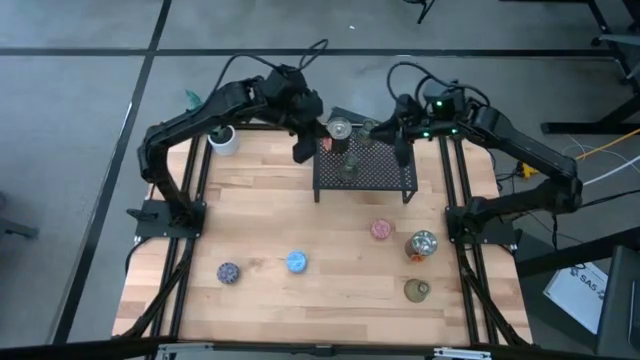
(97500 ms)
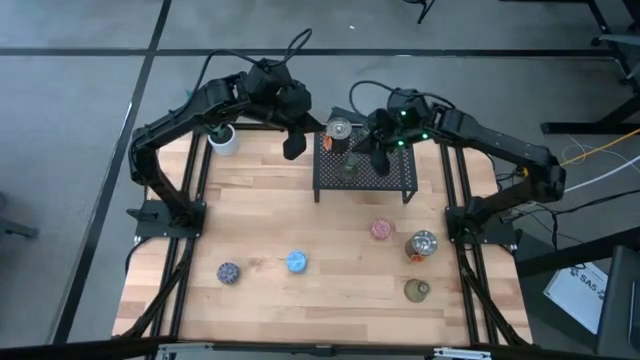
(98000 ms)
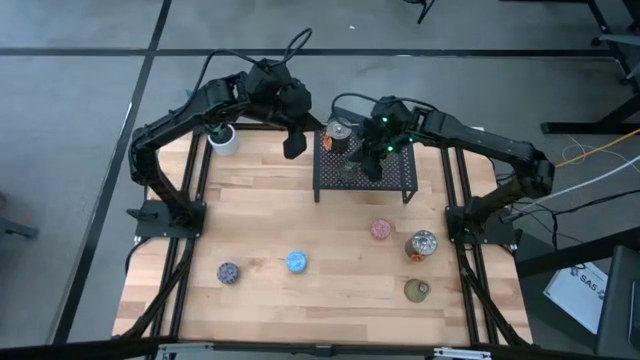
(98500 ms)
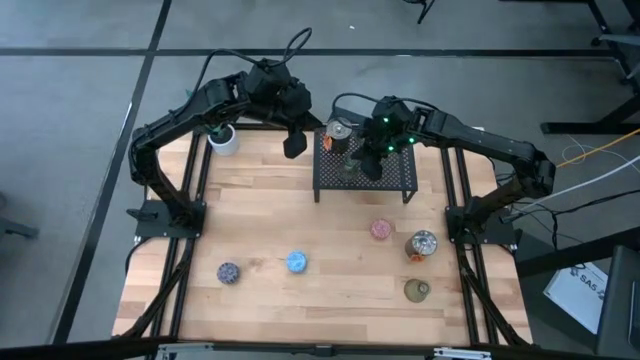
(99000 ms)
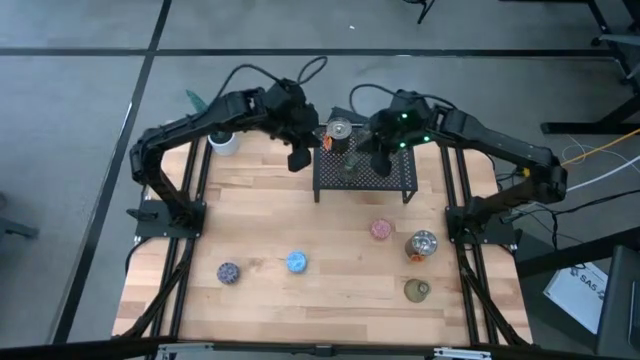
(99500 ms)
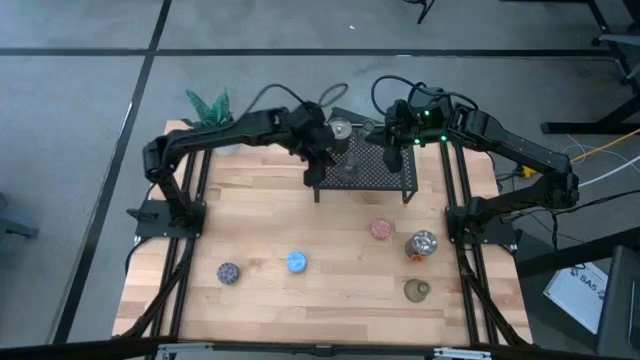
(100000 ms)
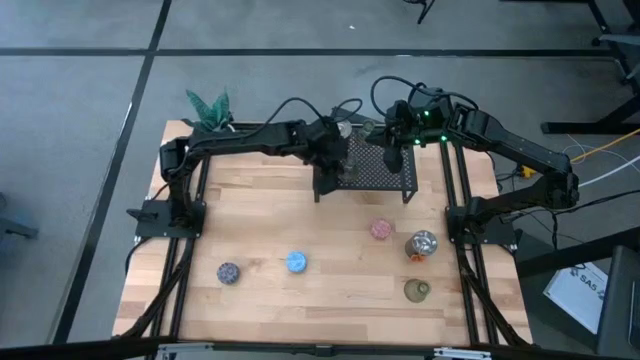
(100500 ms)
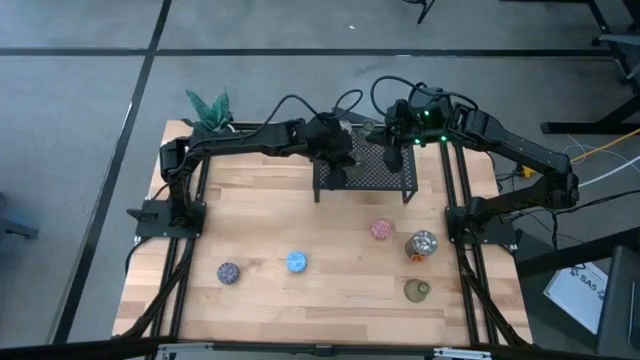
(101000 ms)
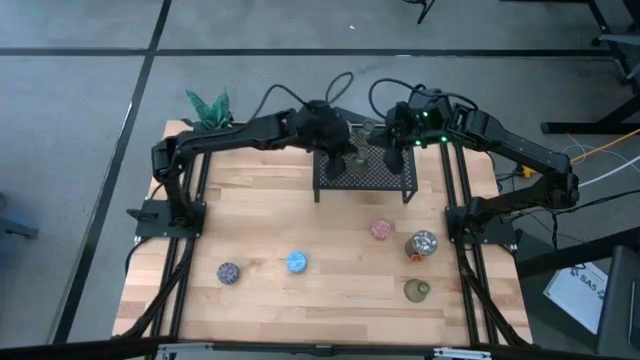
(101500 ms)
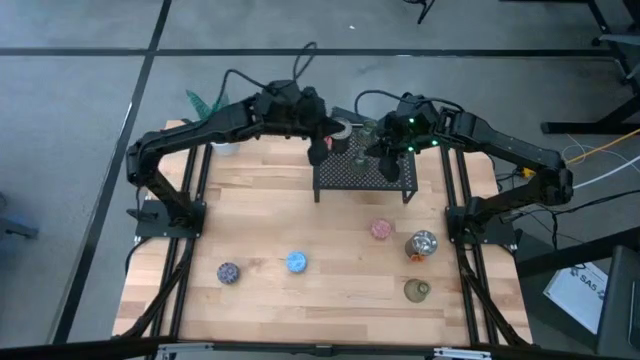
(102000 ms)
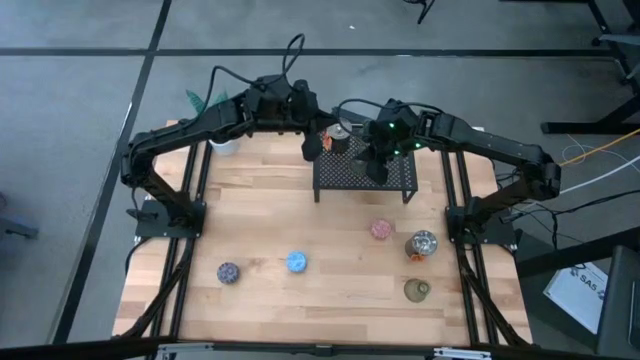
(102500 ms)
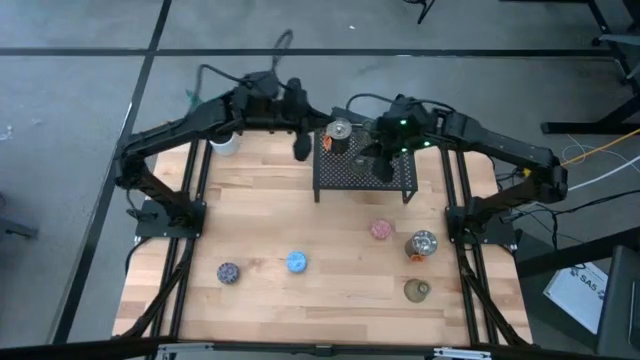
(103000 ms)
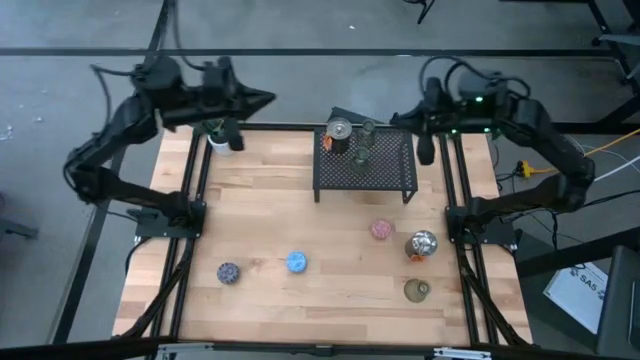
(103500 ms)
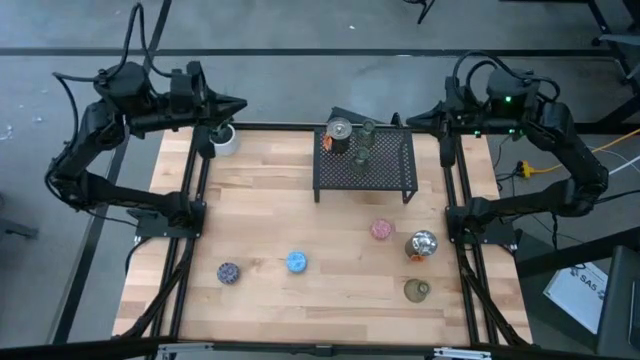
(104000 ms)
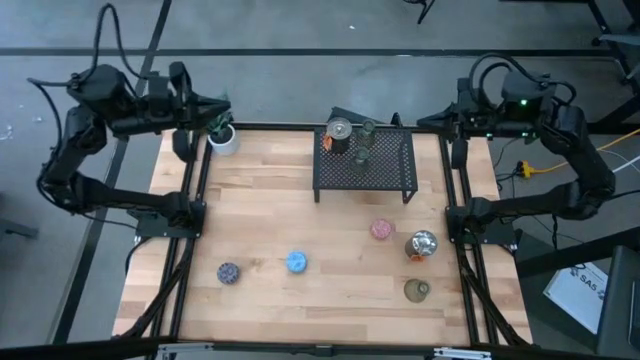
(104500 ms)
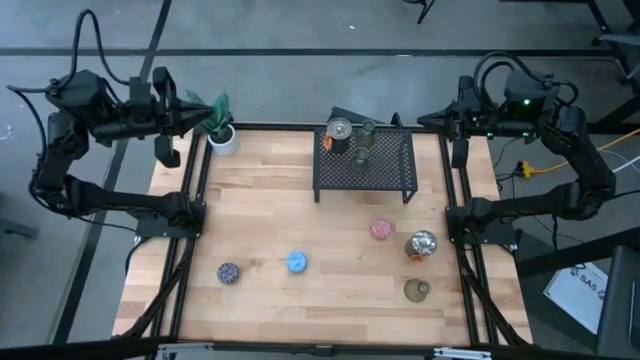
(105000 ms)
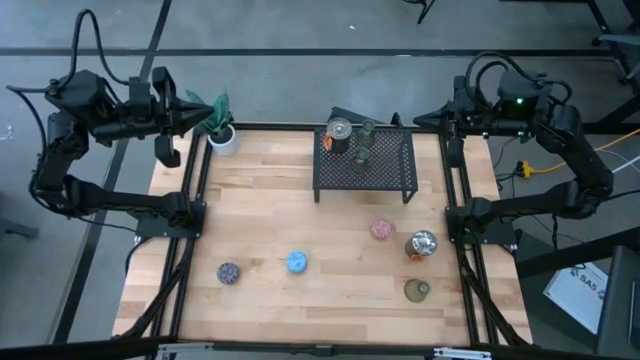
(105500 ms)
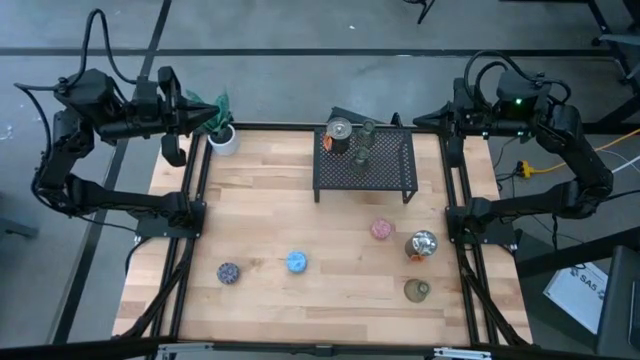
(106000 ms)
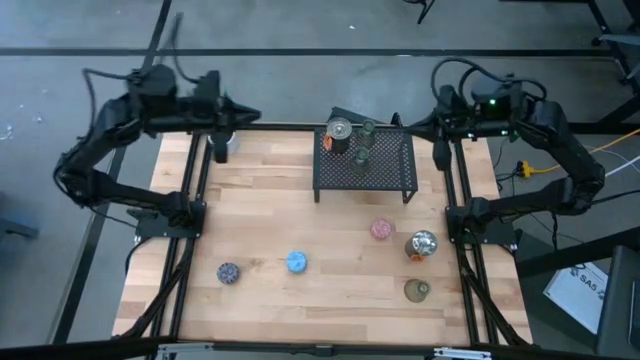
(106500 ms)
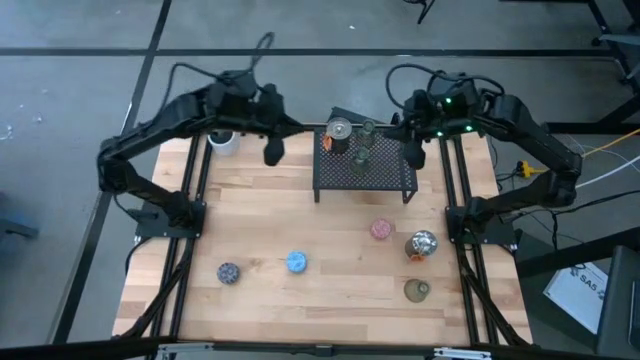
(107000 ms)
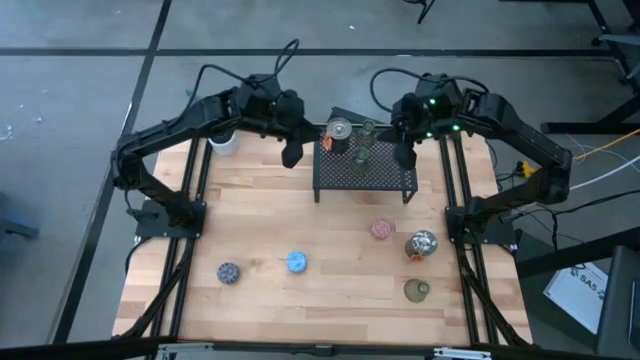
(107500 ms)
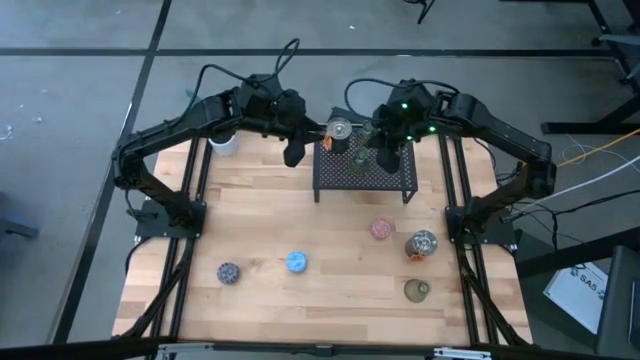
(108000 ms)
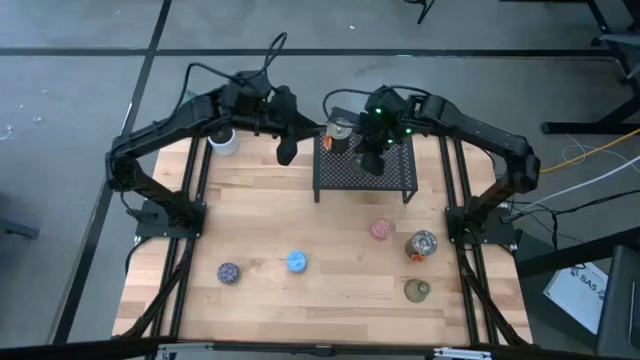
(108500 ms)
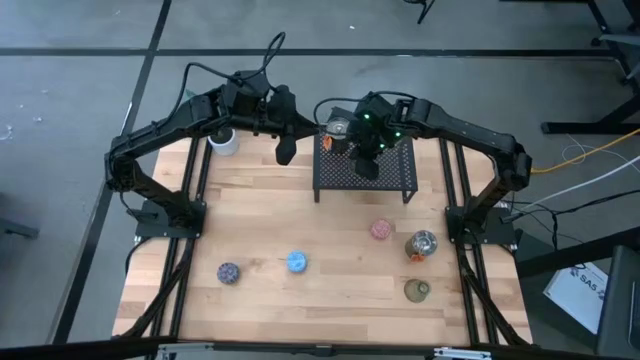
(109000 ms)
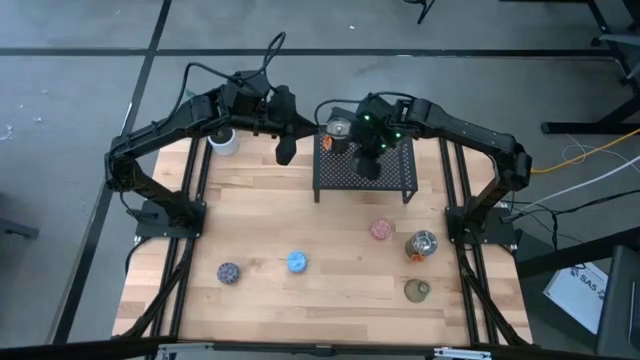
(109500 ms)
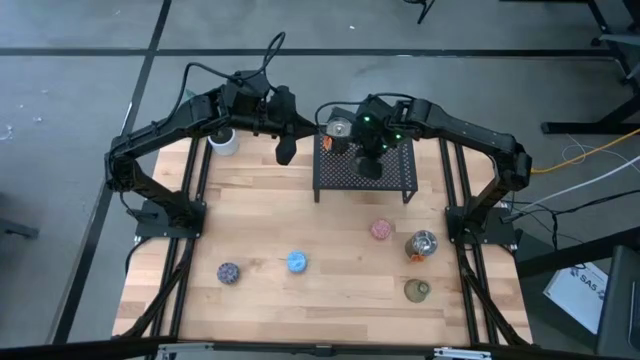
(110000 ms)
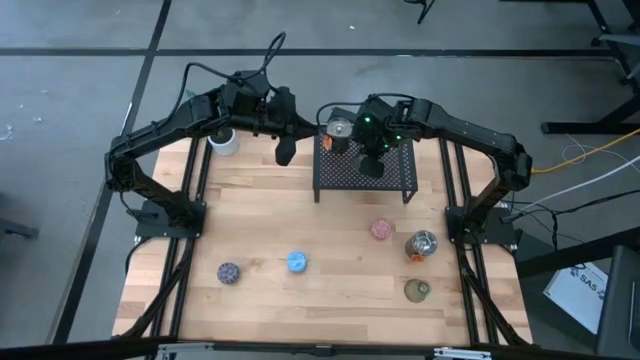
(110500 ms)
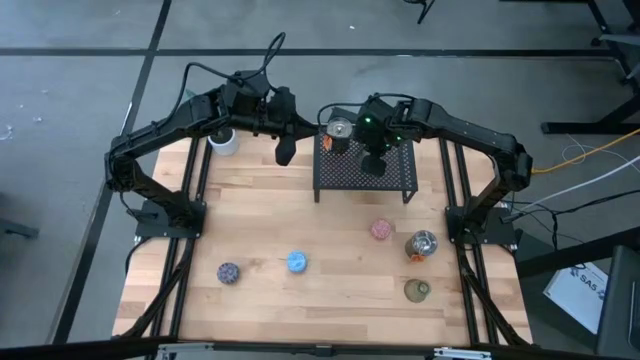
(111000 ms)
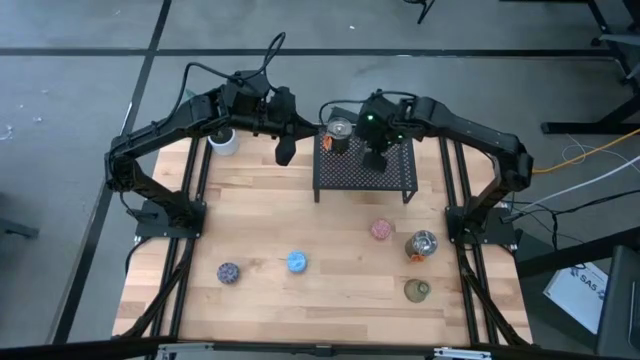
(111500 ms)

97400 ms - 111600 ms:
Task: Pick & Place candle stick holders
Put the top green vase candle holder on the shelf aligned with the other green vase candle holder

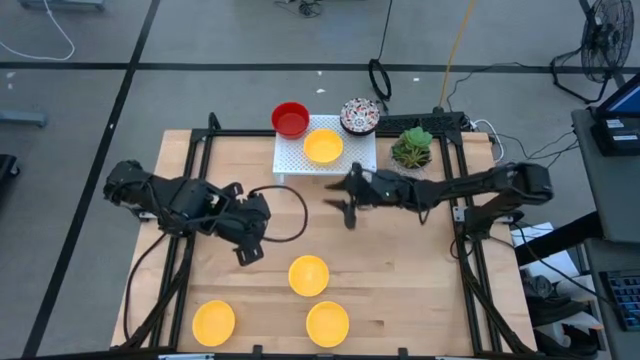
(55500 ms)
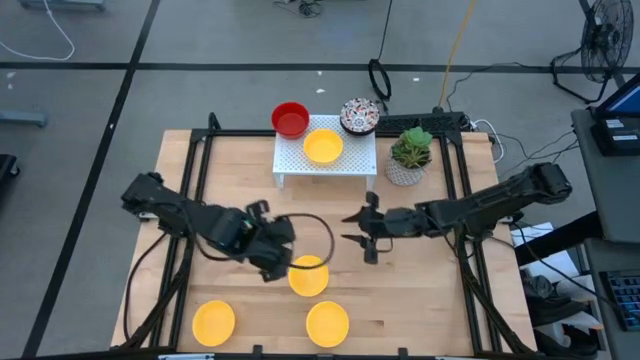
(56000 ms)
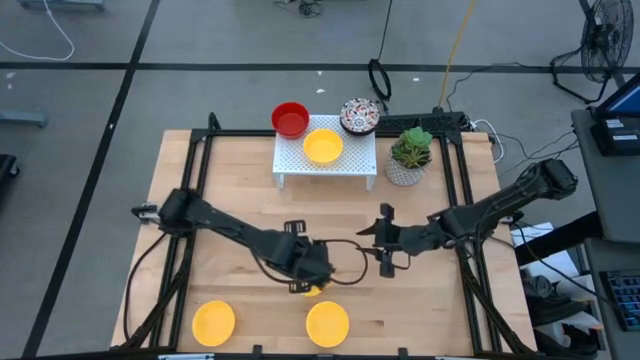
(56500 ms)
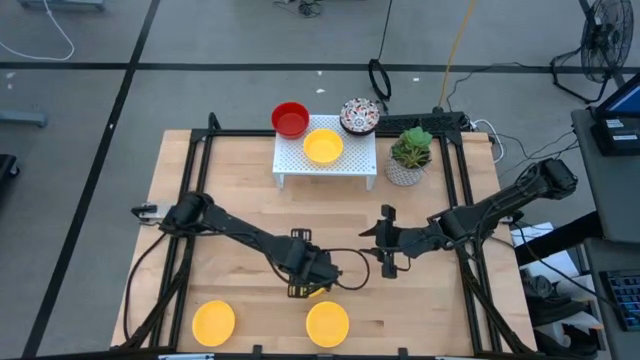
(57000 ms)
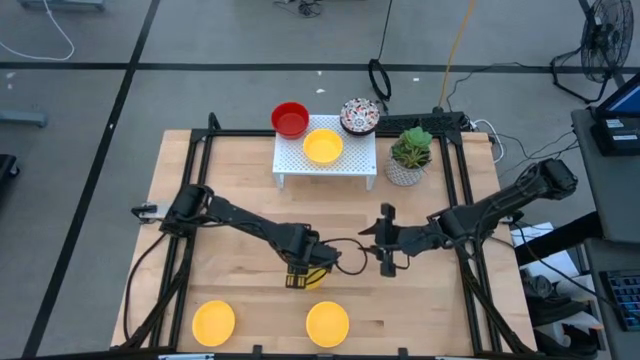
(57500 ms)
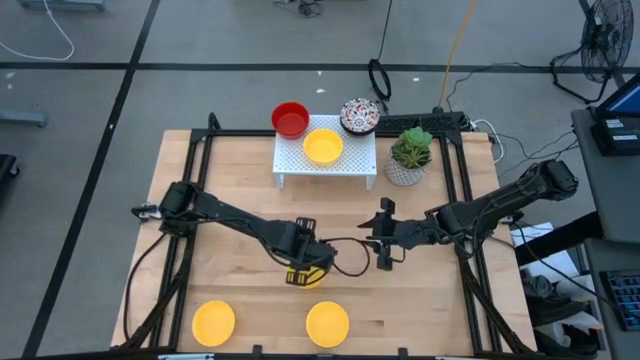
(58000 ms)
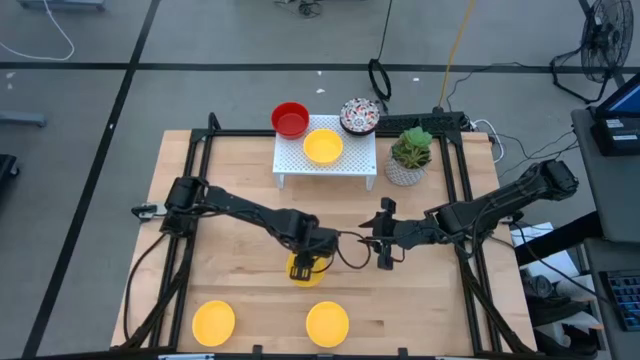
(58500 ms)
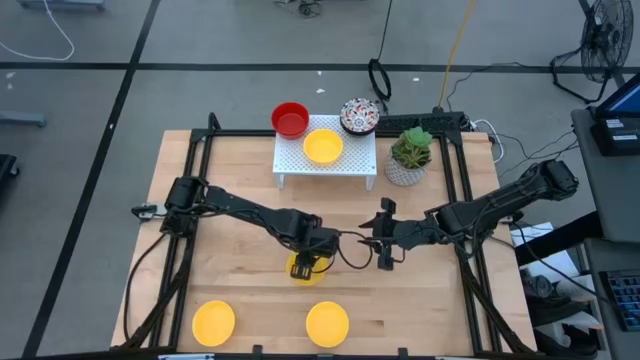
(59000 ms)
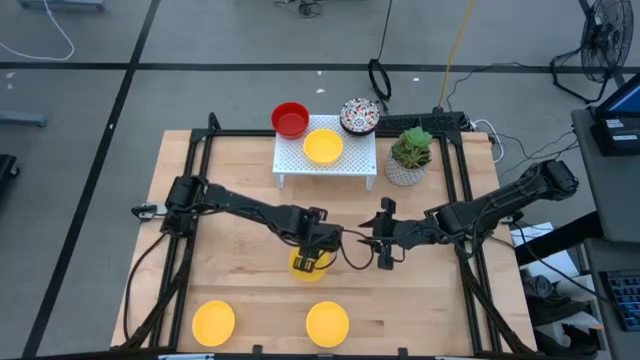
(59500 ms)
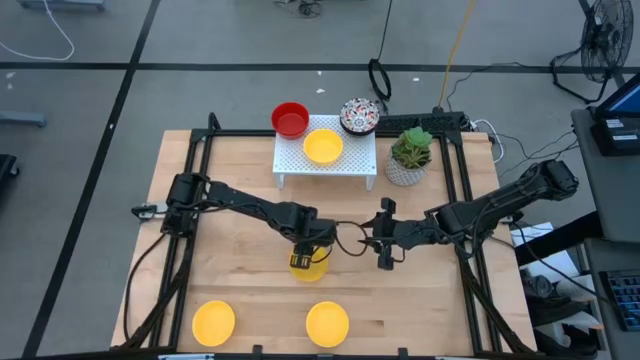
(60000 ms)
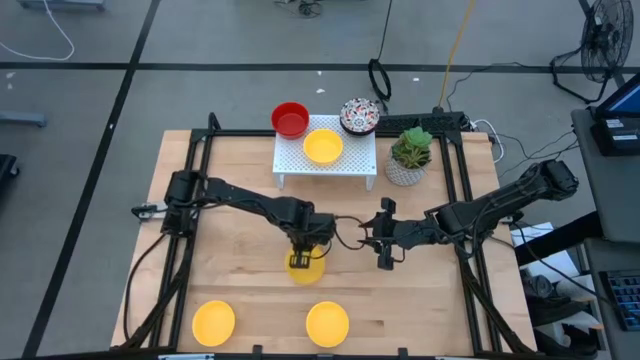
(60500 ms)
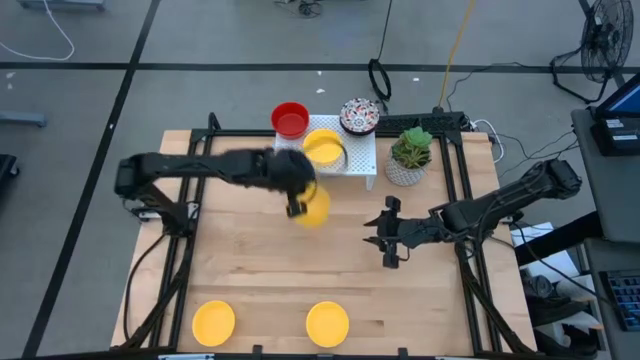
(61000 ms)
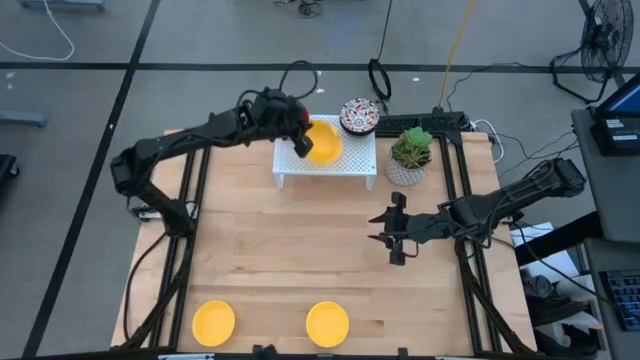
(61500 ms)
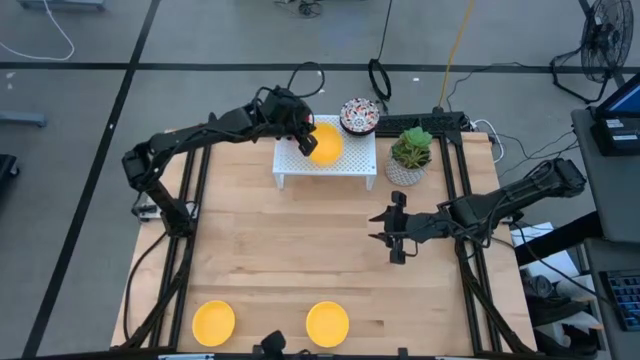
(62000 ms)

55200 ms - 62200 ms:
Task: Pick & Place Mini bowls
Stack the yellow bowl on the yellow bowl on the shelf
